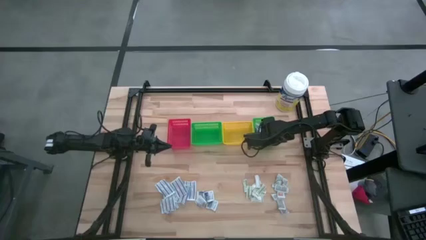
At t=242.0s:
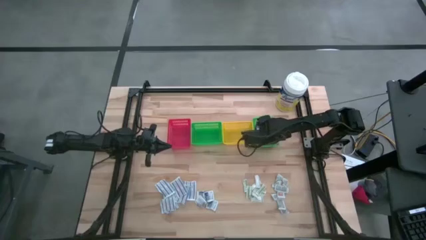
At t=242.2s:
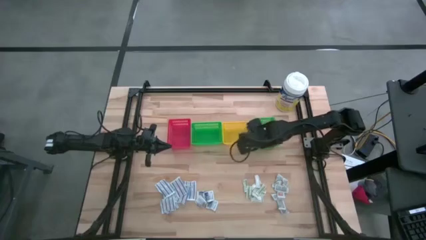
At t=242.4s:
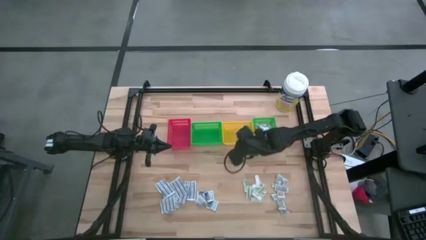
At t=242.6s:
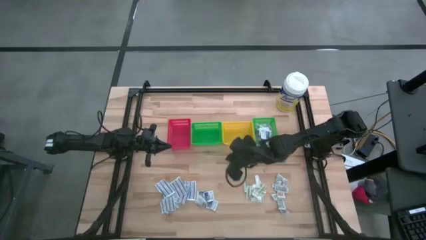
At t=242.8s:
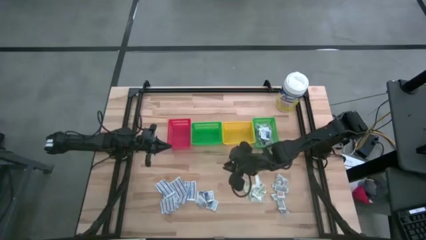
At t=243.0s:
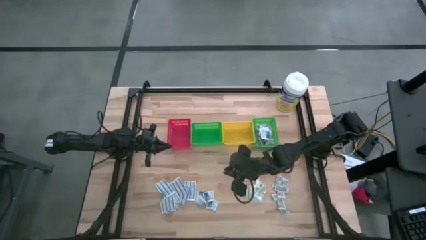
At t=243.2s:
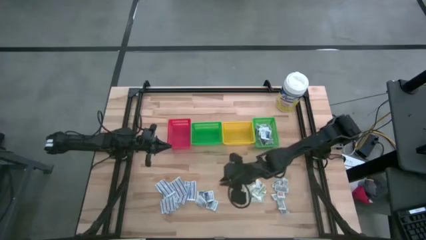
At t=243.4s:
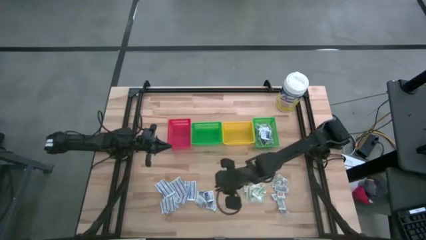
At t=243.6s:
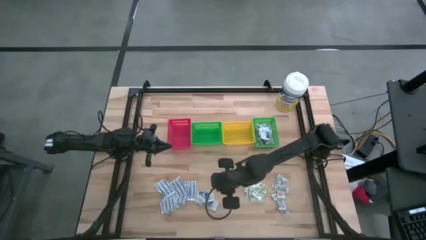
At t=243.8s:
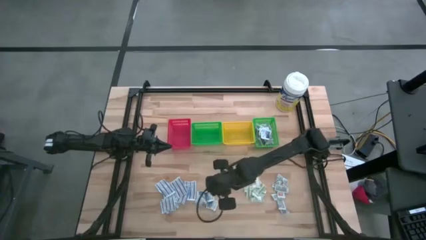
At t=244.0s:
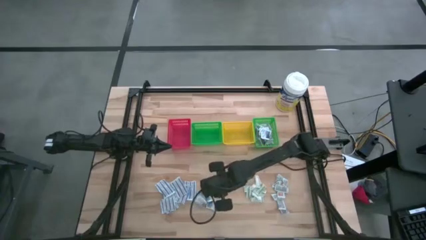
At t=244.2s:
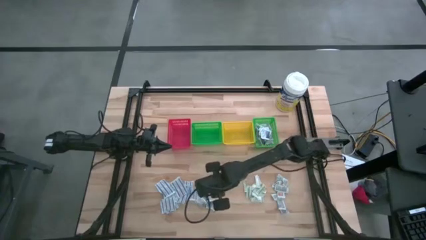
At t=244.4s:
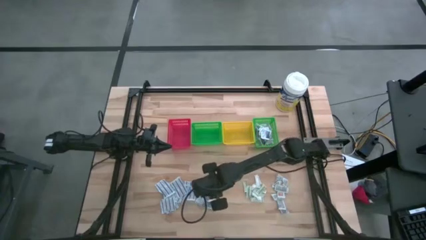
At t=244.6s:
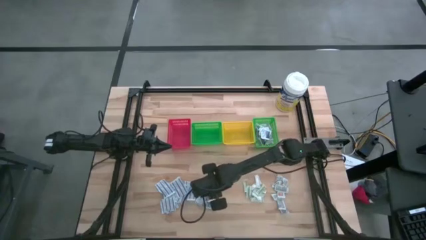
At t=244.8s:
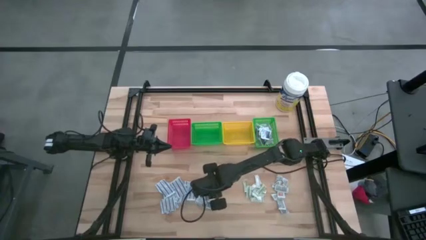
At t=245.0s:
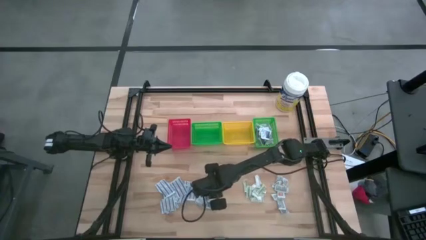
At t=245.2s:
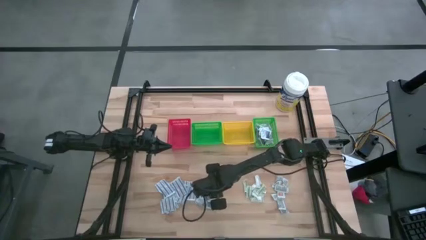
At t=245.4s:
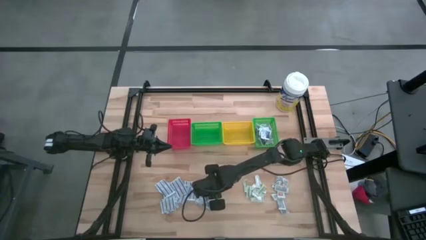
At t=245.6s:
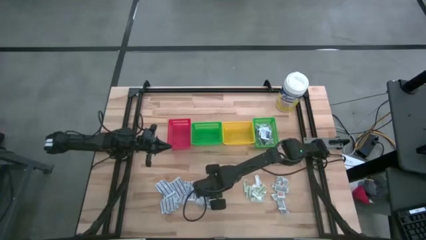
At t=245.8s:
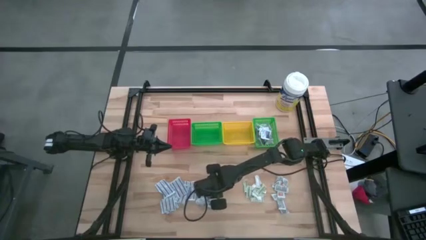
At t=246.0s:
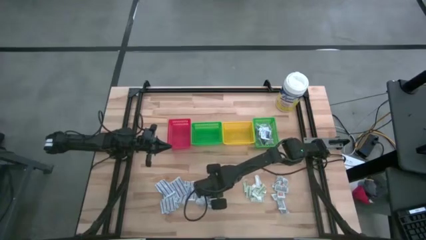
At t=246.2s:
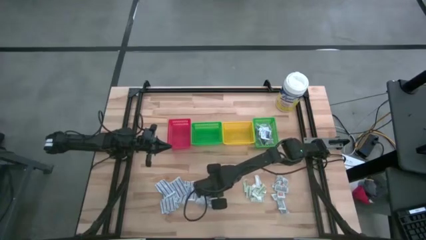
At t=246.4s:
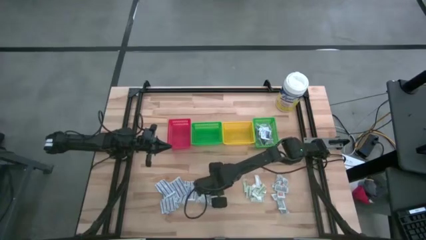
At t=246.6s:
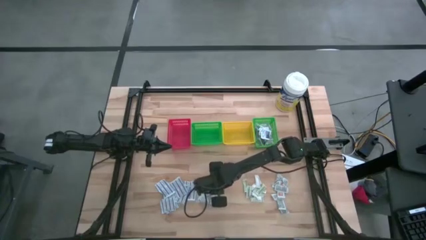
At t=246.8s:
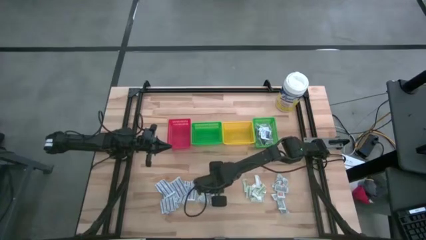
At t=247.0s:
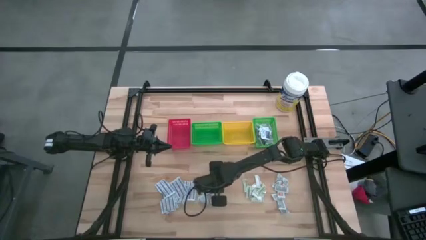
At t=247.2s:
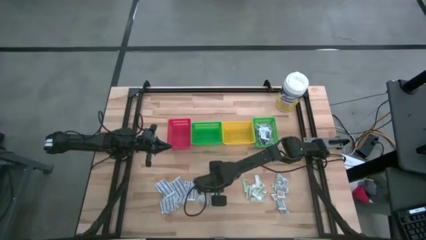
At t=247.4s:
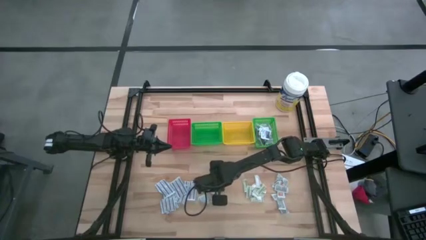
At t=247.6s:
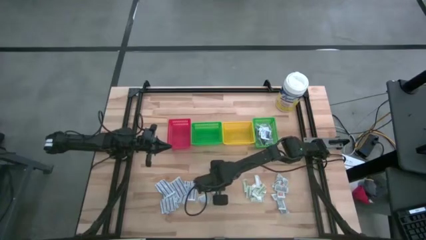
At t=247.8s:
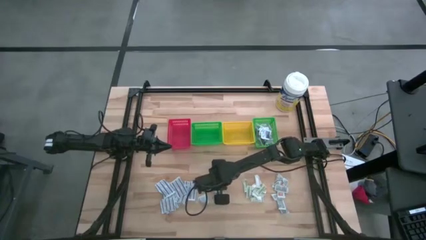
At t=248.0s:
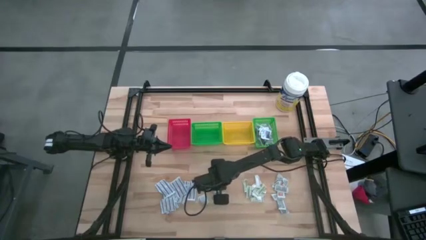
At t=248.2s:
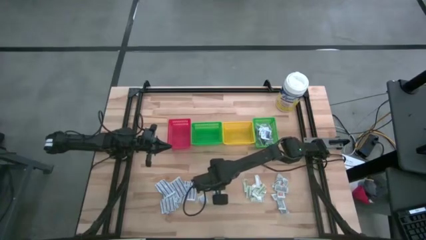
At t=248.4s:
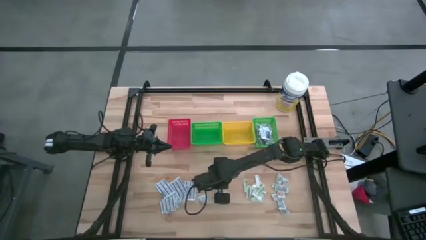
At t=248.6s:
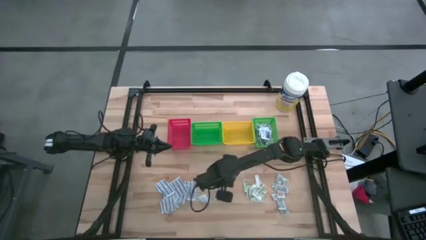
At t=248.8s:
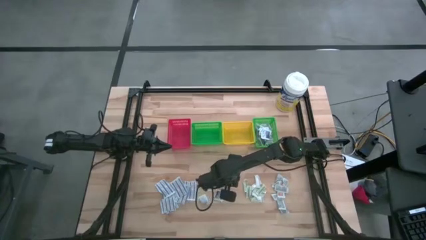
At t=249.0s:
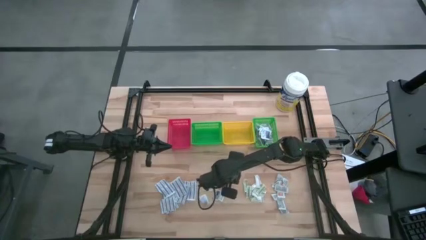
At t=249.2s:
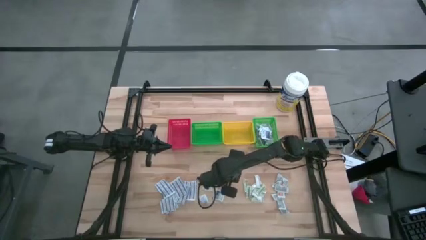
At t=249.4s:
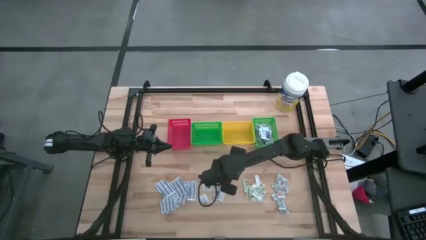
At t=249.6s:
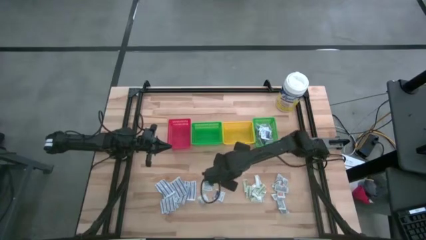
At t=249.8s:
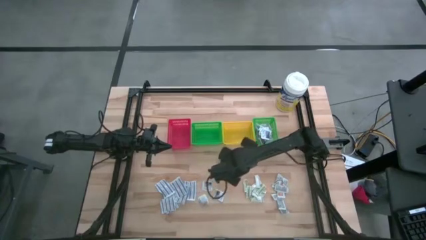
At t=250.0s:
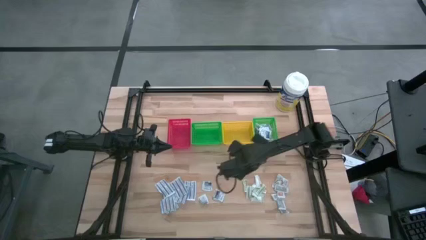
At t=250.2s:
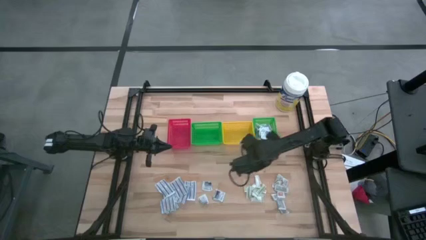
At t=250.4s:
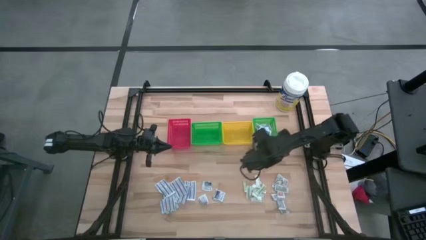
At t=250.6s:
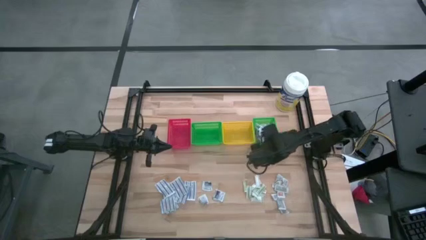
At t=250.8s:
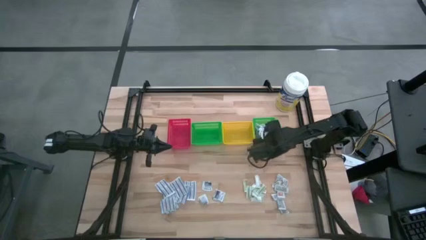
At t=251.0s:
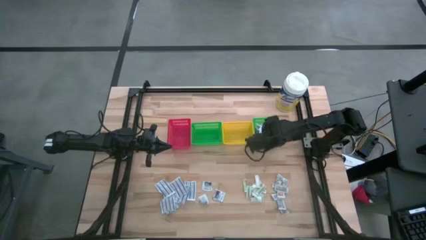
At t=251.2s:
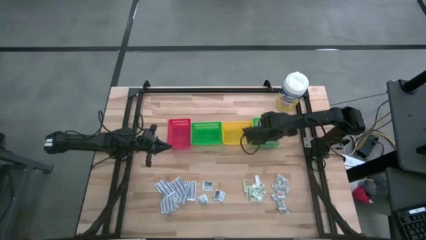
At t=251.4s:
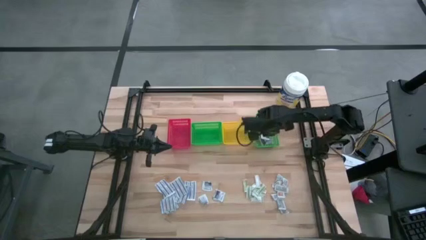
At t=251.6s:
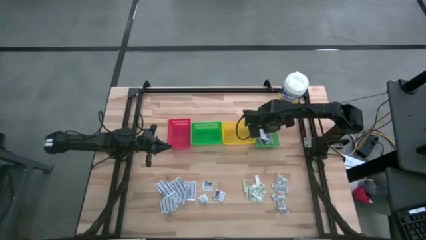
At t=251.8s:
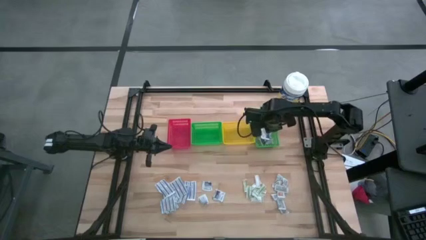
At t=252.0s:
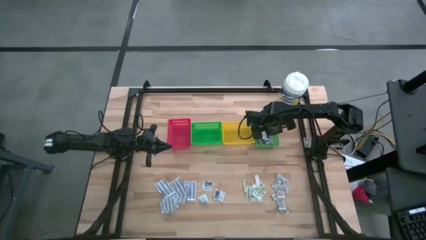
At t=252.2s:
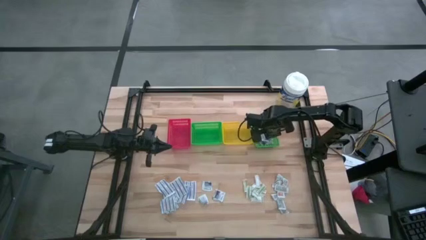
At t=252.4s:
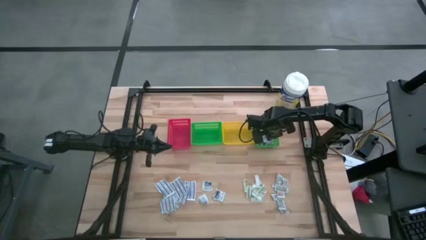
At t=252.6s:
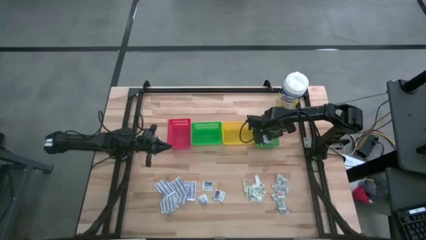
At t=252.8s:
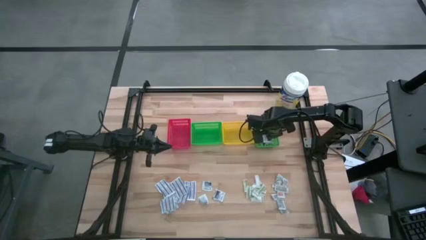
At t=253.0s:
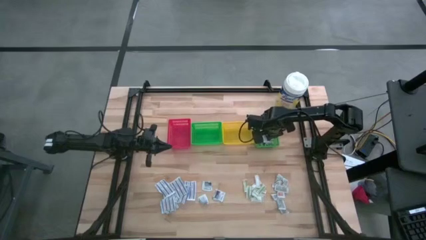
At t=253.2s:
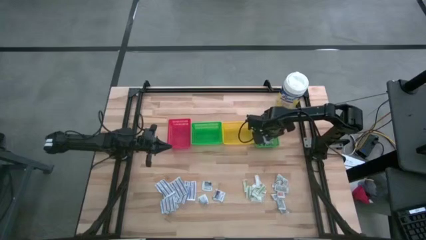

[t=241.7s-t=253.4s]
Task: Pick & Place First Aid Supplies
Put the blue alcohol pad into the right green bin
